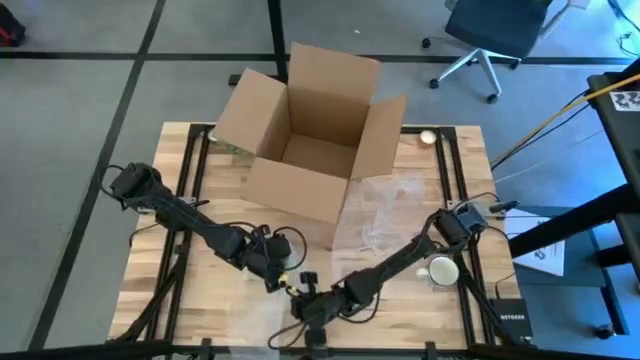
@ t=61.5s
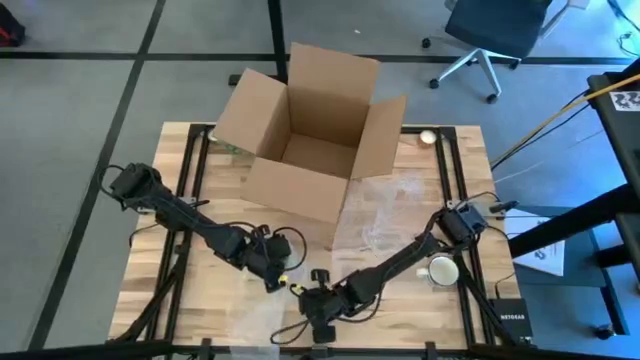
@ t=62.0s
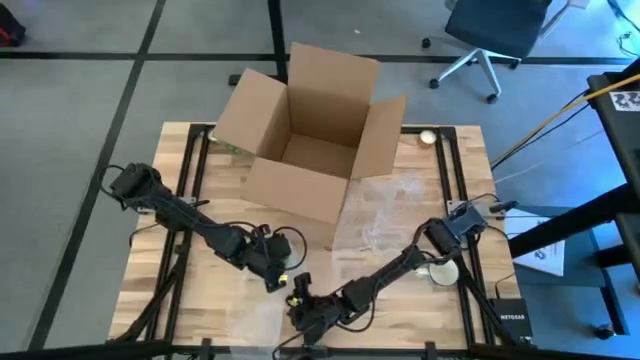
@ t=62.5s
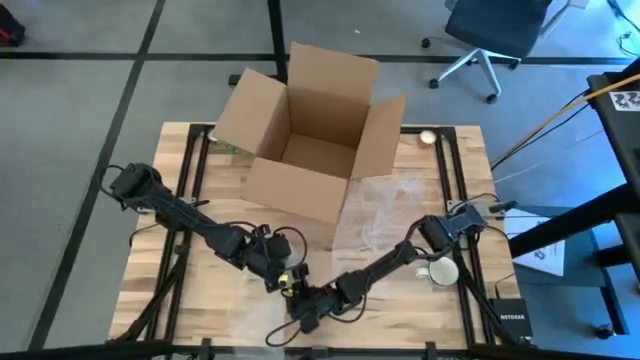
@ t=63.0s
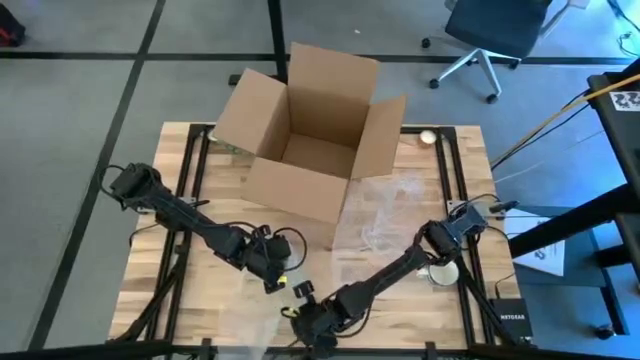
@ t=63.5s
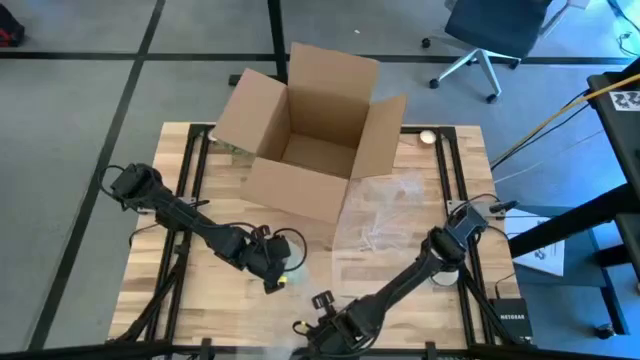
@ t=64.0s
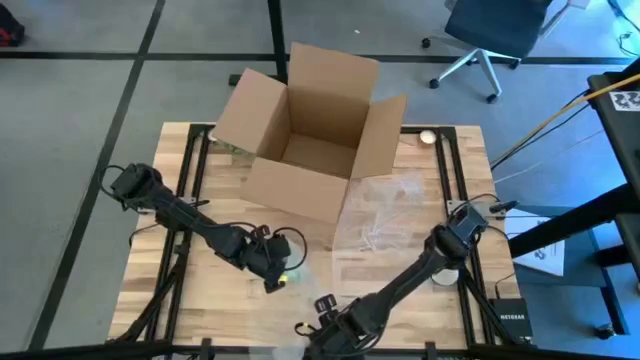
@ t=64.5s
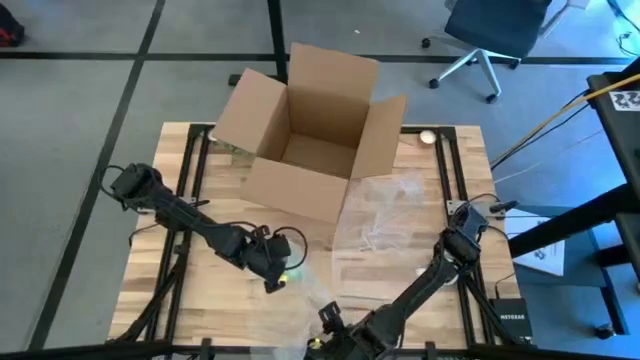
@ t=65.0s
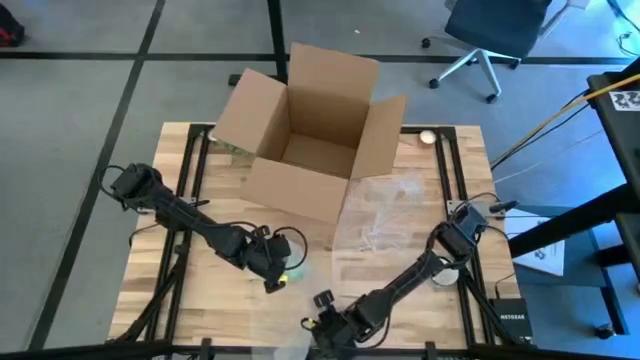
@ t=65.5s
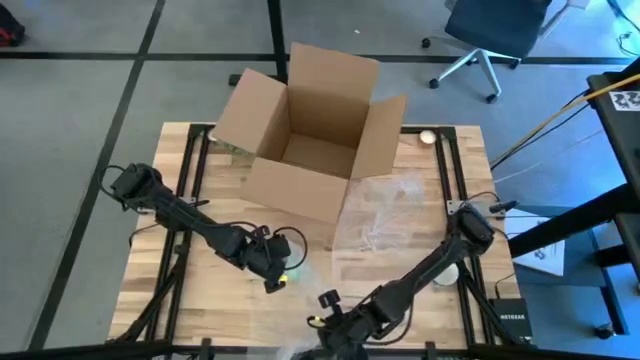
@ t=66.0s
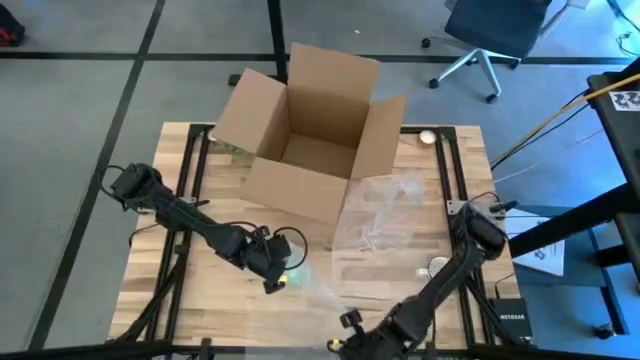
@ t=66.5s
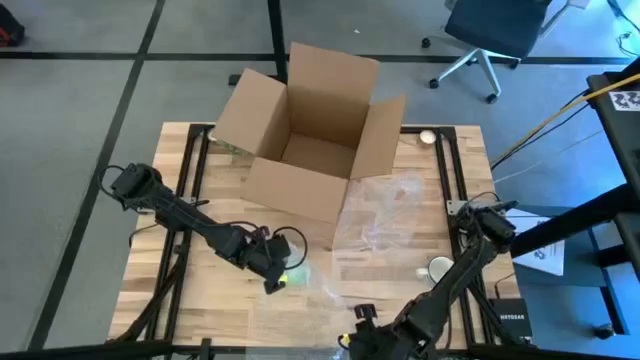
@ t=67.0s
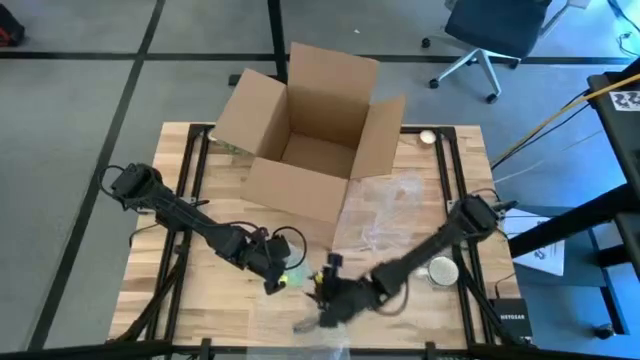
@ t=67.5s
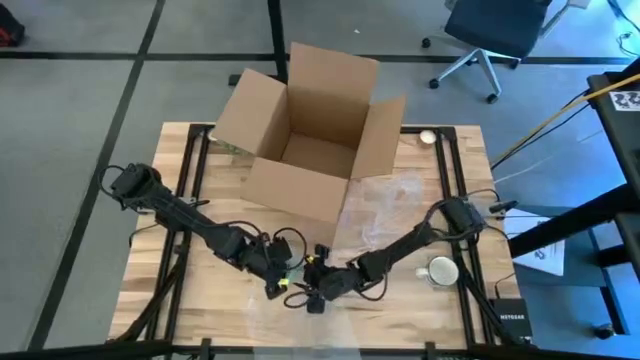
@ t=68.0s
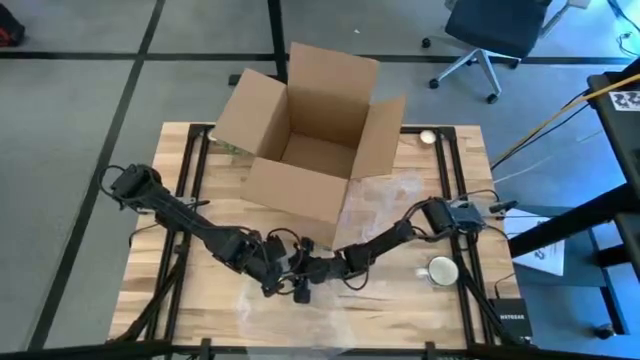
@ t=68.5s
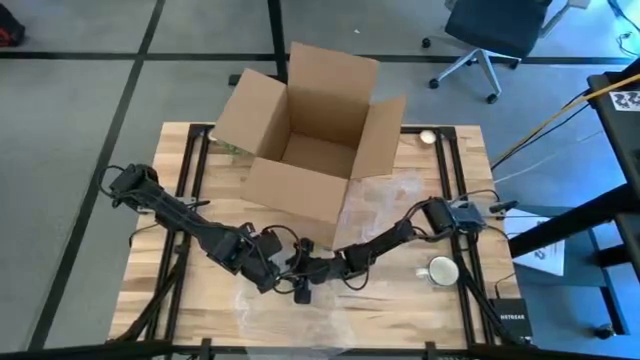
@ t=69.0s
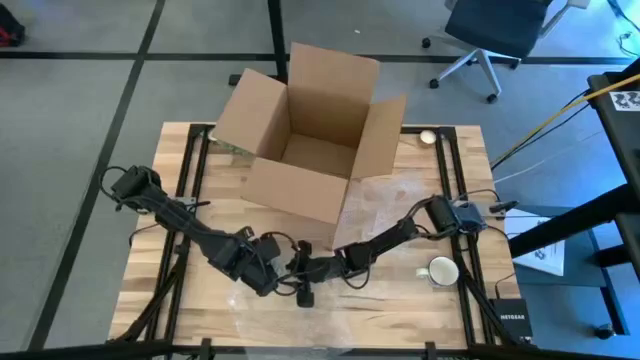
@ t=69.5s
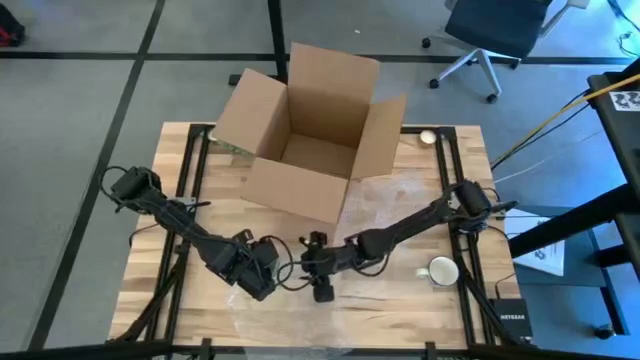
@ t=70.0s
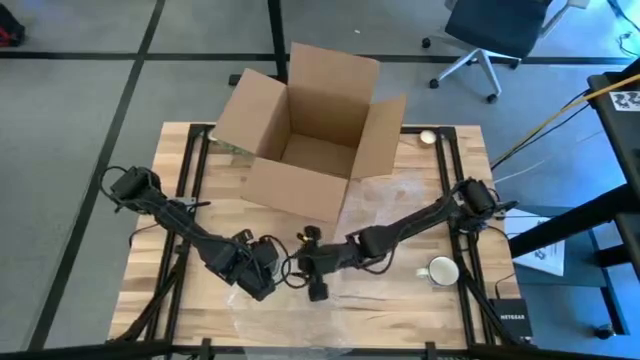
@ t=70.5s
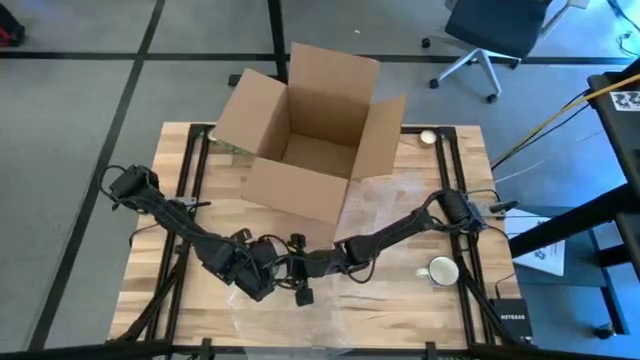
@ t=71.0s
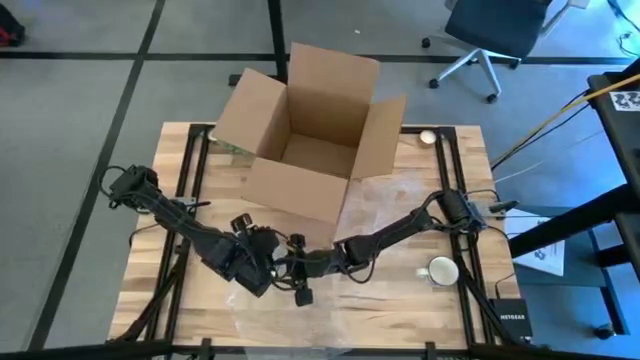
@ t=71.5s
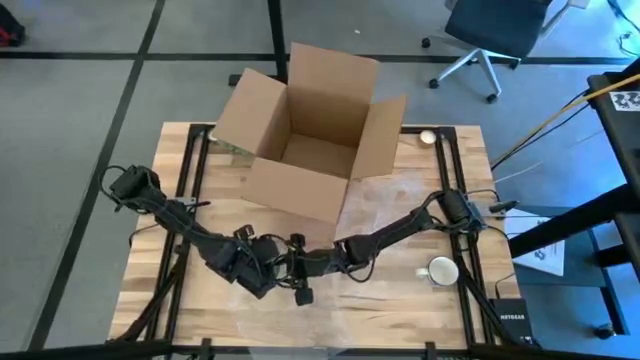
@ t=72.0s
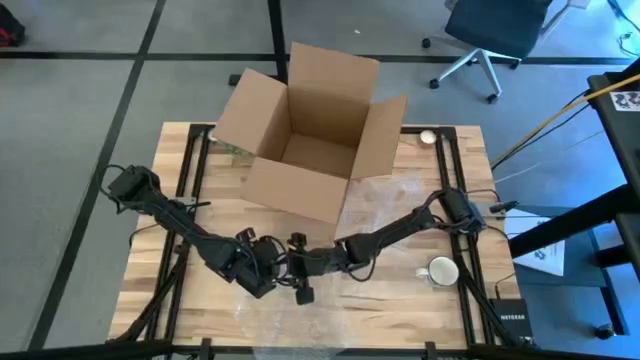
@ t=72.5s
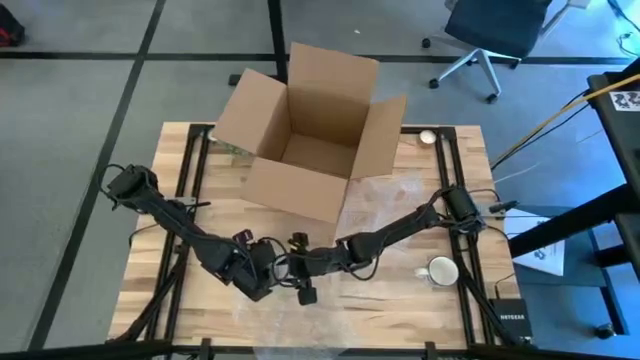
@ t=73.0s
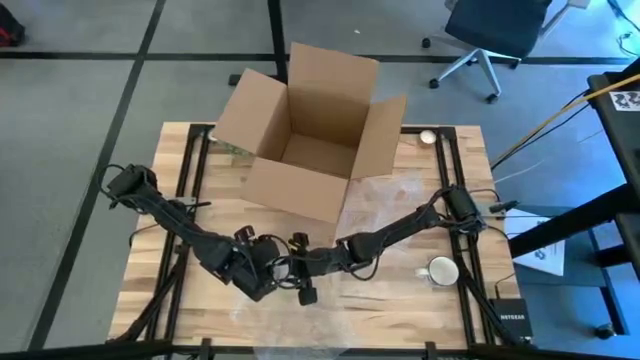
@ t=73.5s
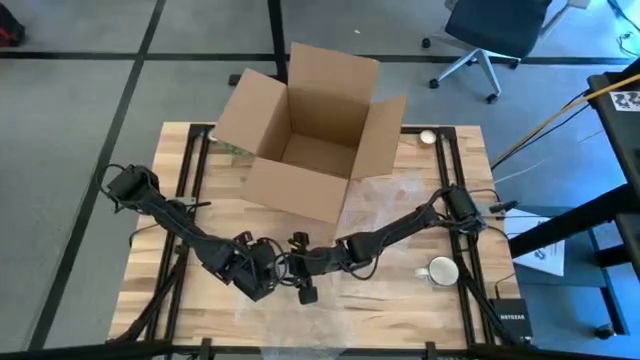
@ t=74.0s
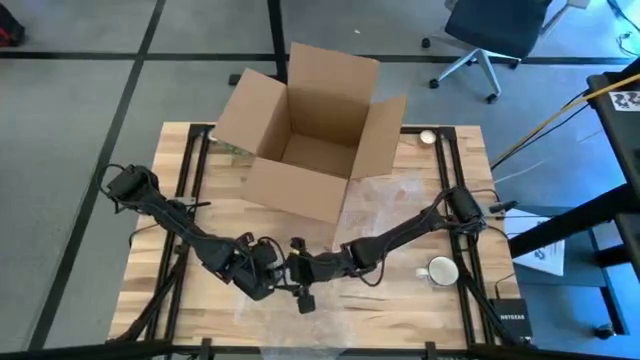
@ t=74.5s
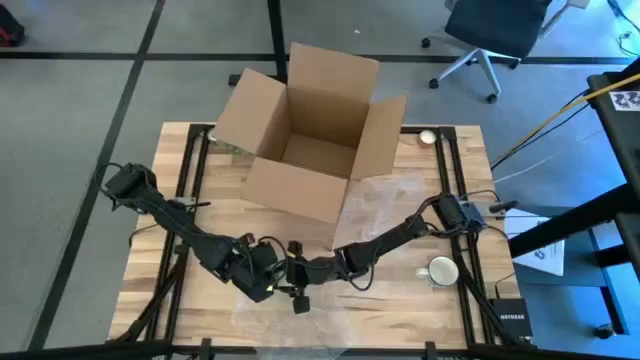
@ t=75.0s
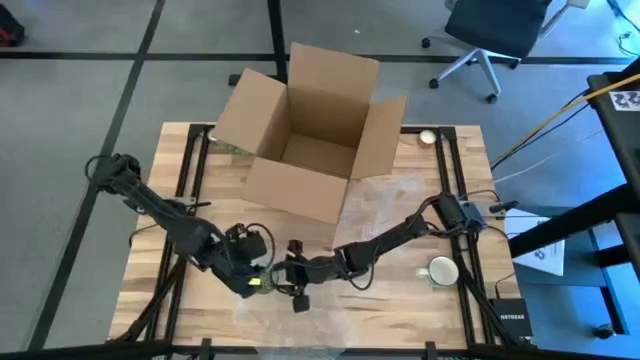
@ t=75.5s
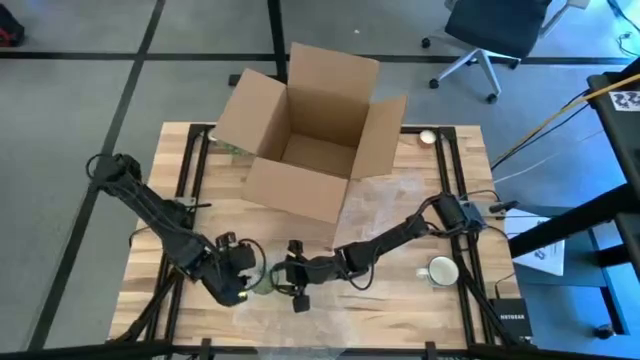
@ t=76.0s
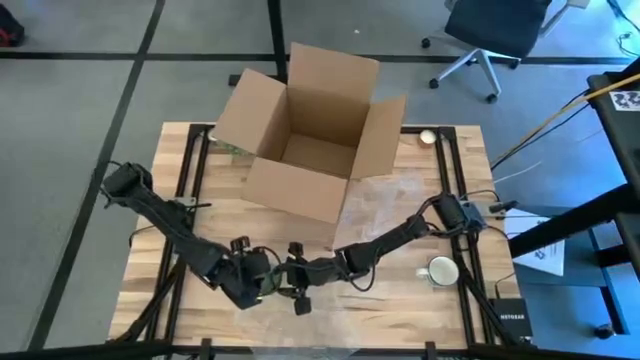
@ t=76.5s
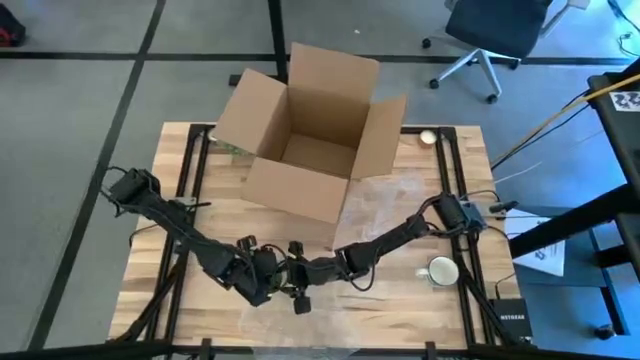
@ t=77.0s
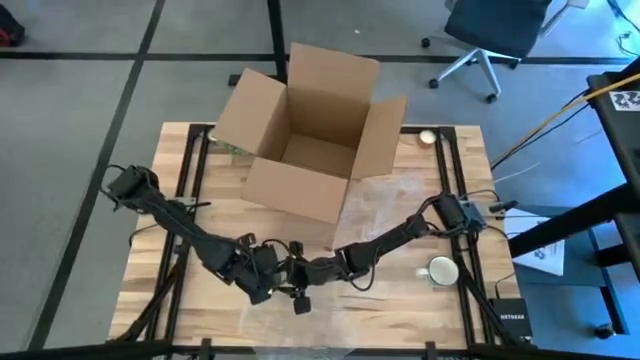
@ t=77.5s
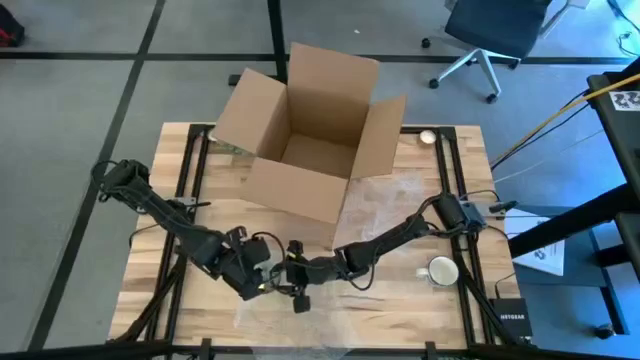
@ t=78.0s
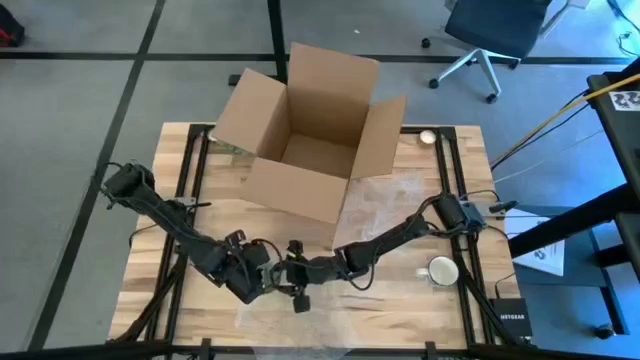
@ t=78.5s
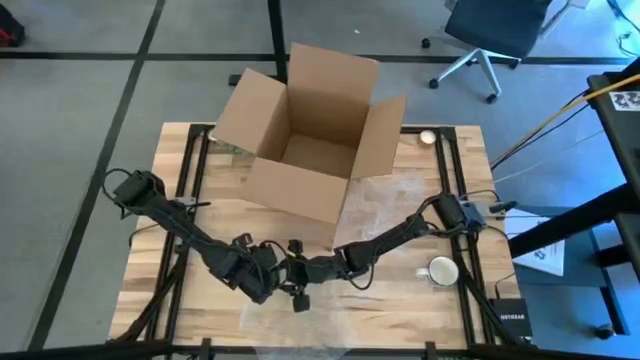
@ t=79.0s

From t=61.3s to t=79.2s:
Task: wrap mug
Wrap the green mug with bubble wrap

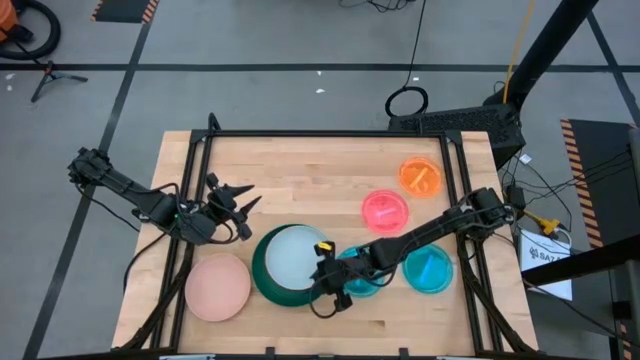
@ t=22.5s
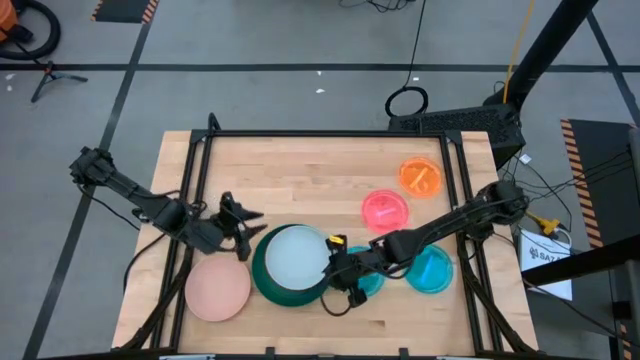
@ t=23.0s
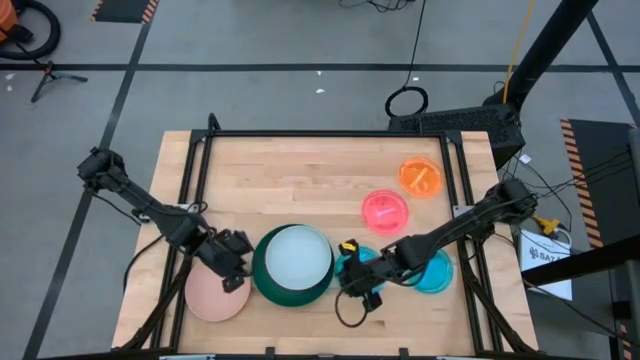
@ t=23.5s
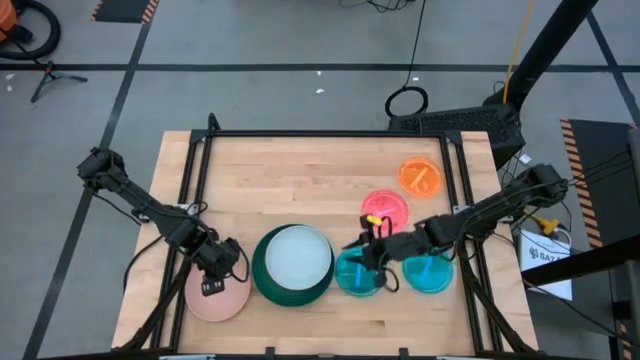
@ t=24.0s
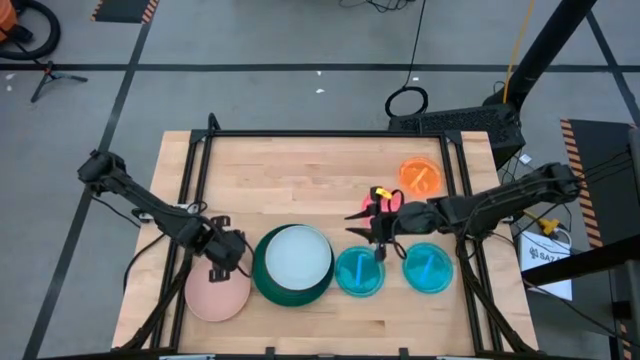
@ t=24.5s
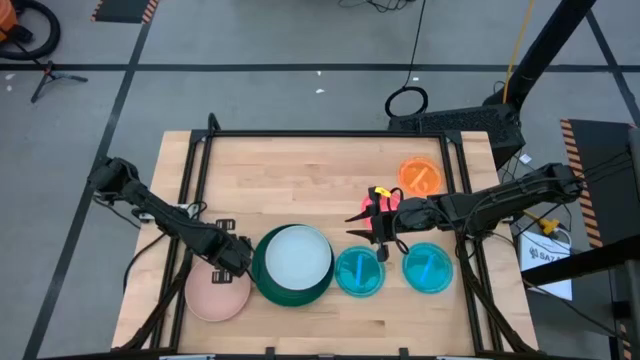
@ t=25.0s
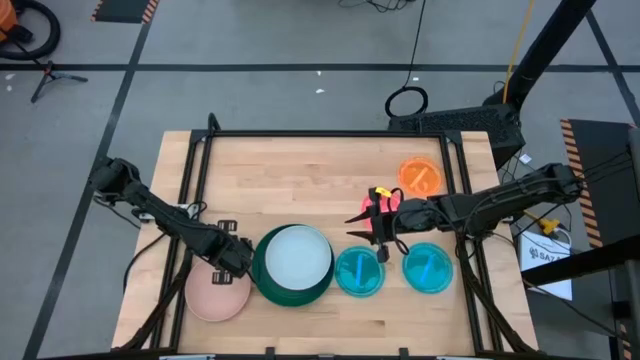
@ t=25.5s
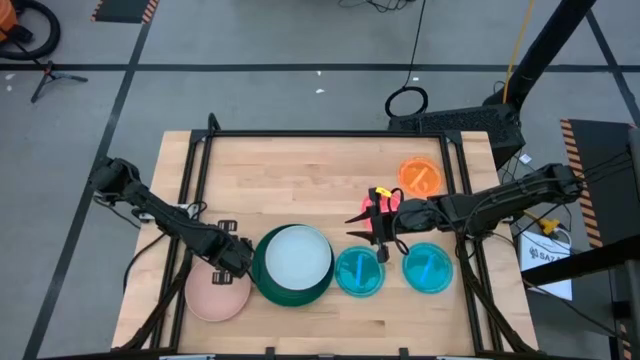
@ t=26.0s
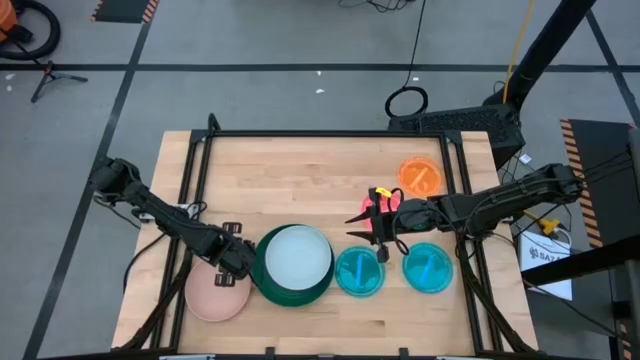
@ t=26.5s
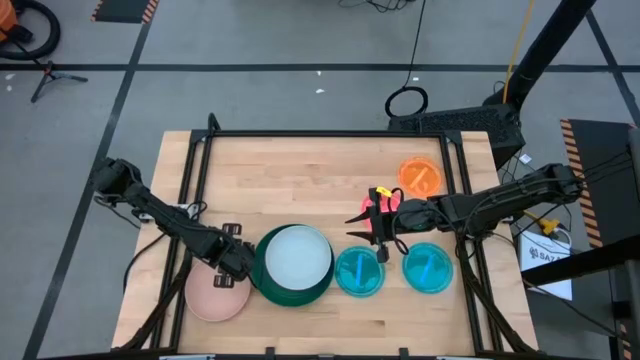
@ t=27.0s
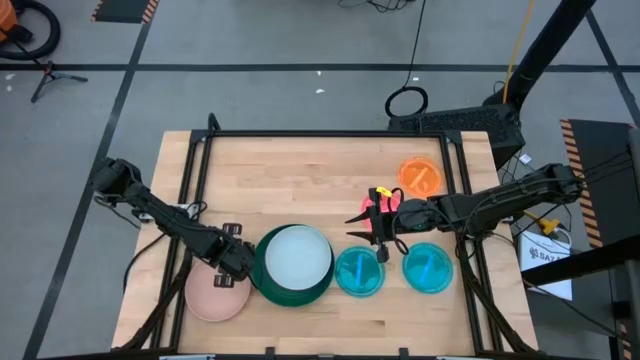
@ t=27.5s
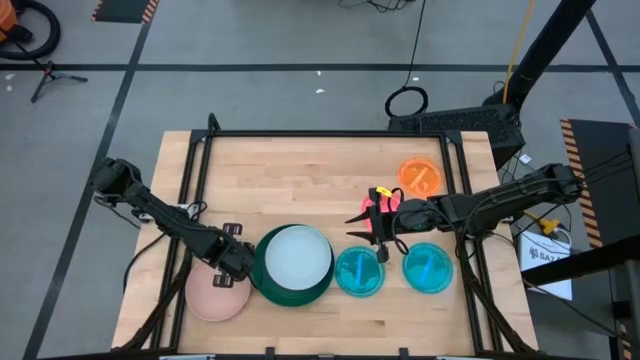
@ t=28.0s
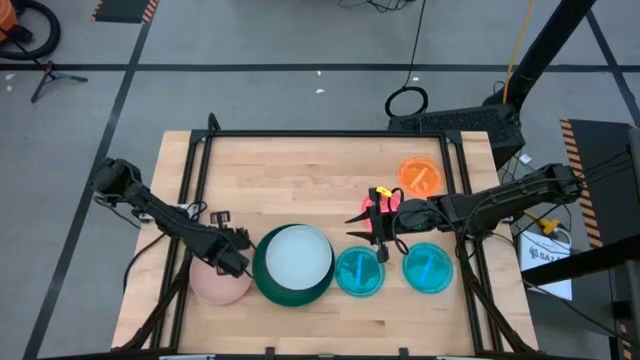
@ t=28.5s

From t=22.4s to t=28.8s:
Task: Stack plastic plates
Stack the light pink plate on top of the light blue plate
